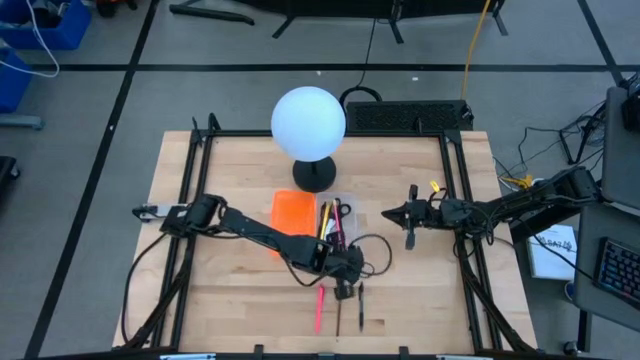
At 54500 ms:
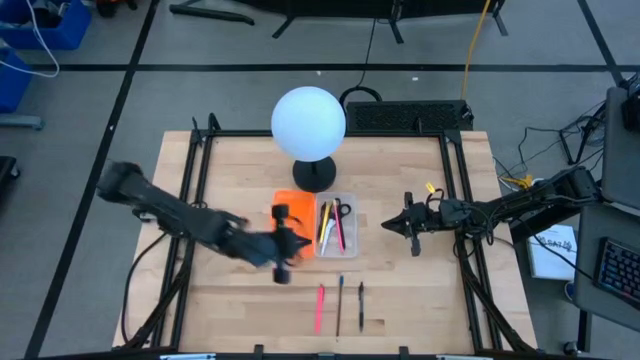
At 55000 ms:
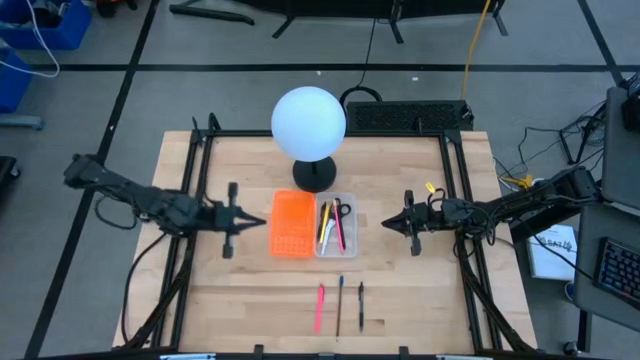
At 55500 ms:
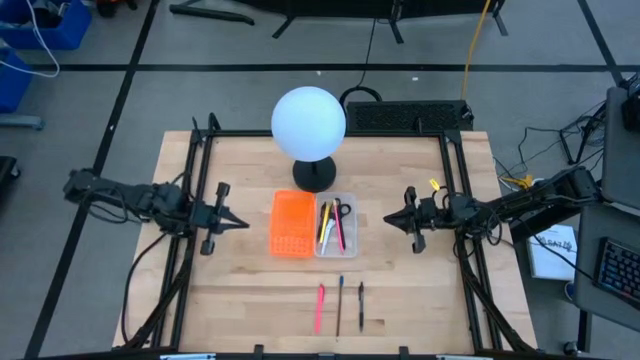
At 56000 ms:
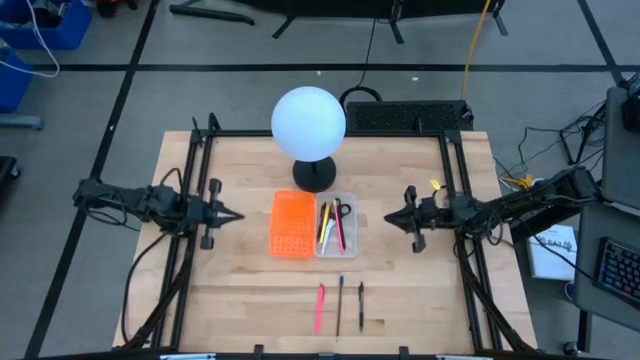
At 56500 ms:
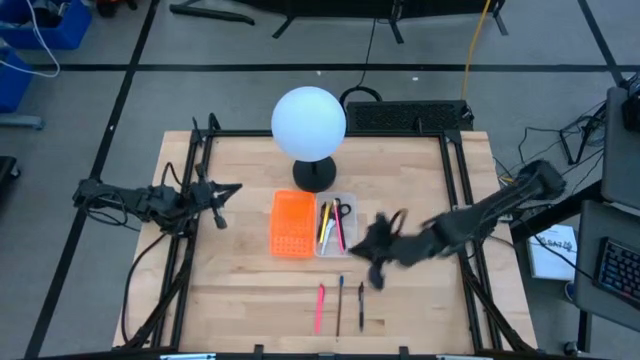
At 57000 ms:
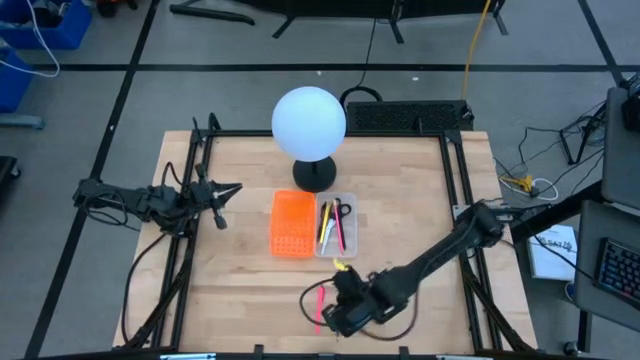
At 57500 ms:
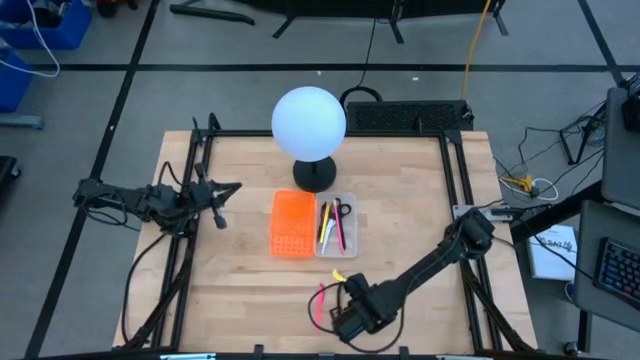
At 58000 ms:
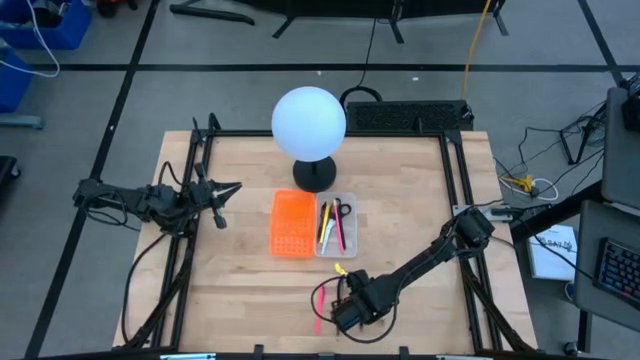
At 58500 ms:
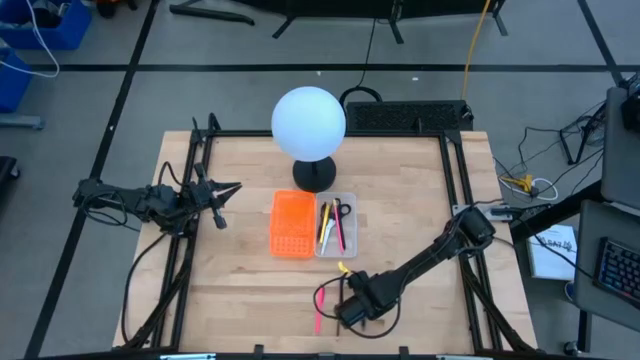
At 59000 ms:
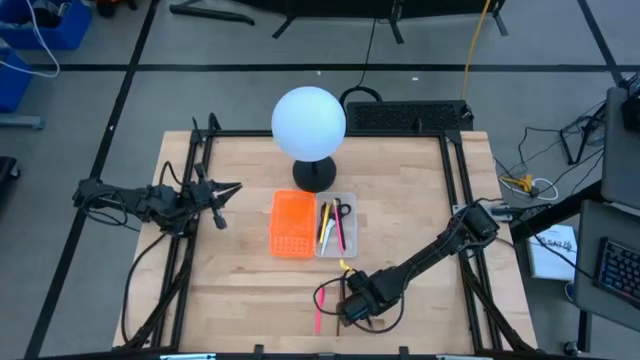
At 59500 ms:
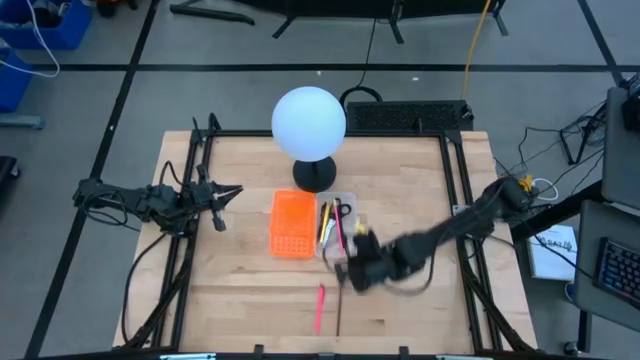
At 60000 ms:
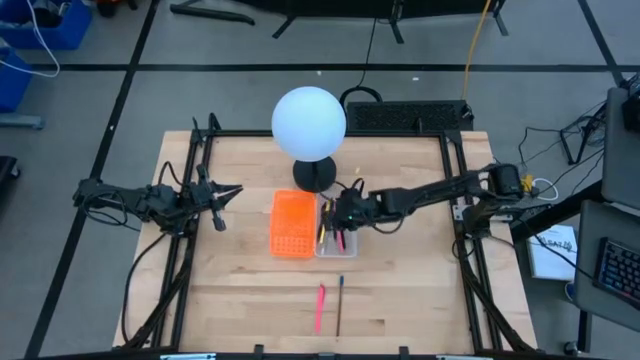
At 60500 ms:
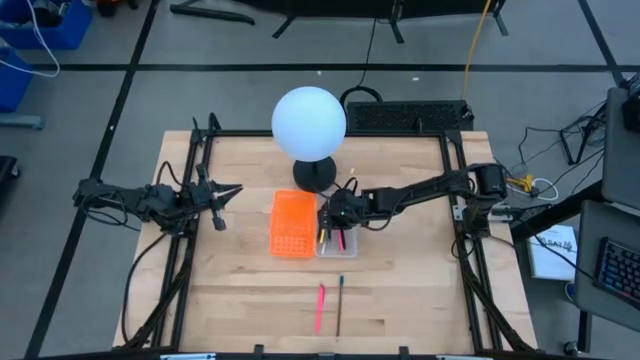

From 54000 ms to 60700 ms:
Task: Pick & place school supplies into a supply box
Put the black pen into the pencil box

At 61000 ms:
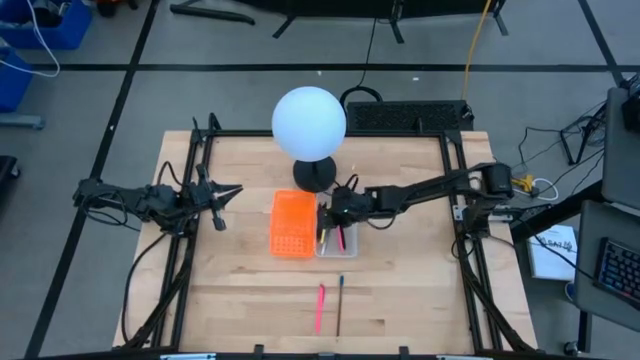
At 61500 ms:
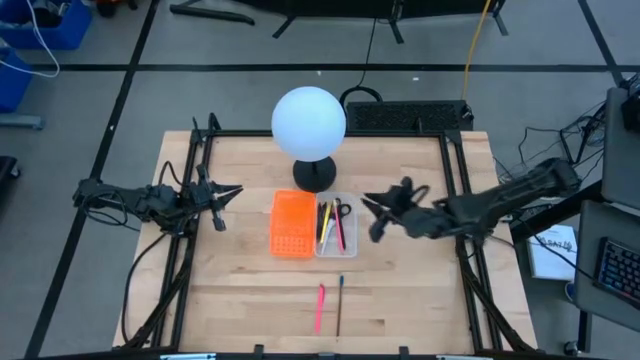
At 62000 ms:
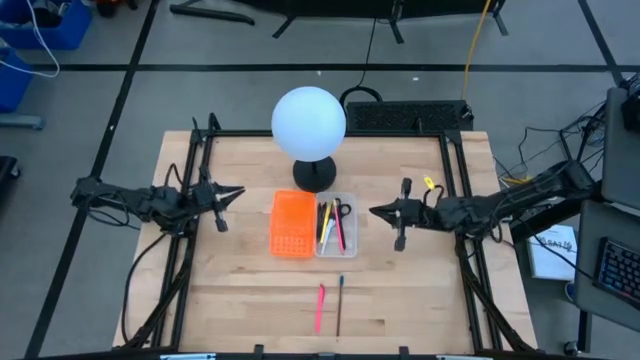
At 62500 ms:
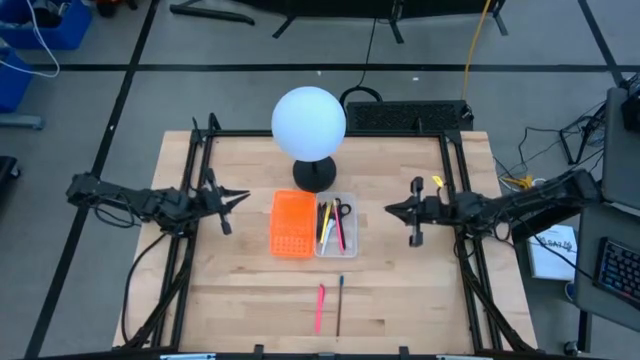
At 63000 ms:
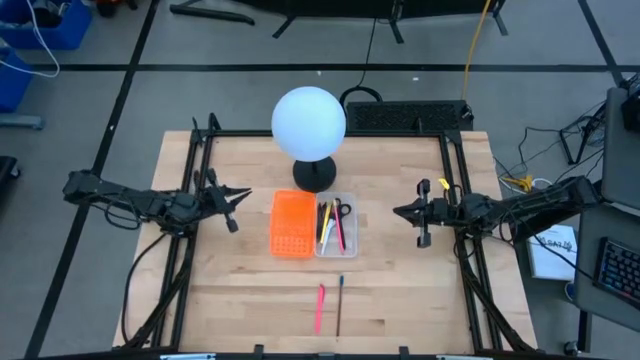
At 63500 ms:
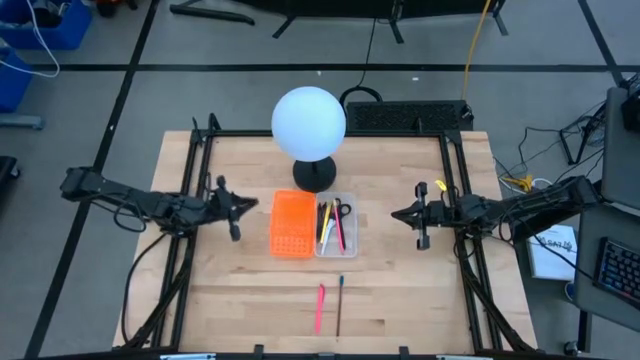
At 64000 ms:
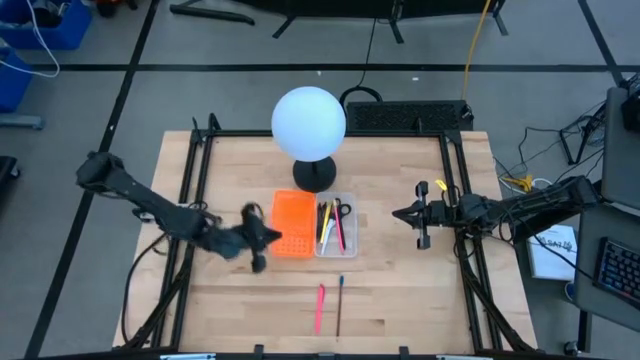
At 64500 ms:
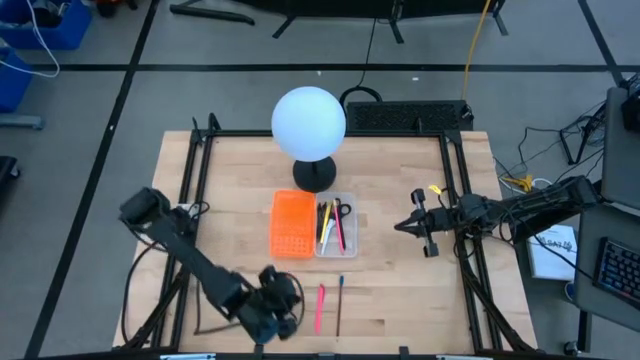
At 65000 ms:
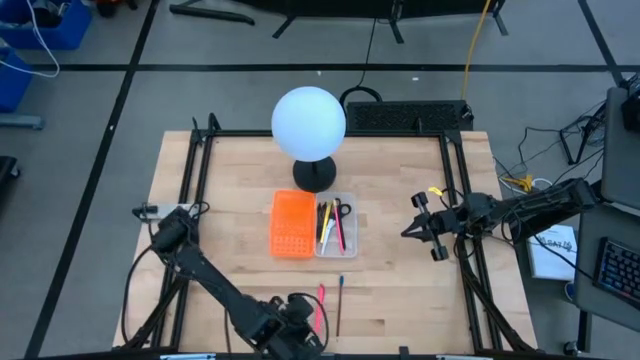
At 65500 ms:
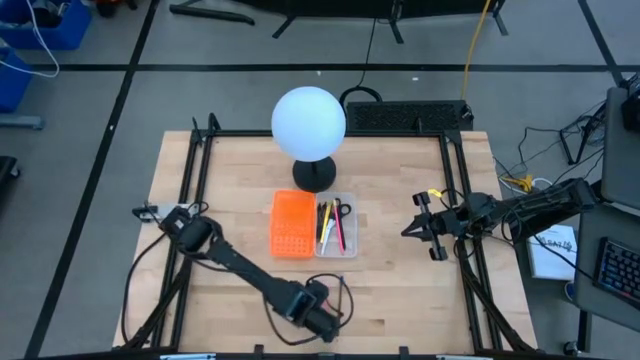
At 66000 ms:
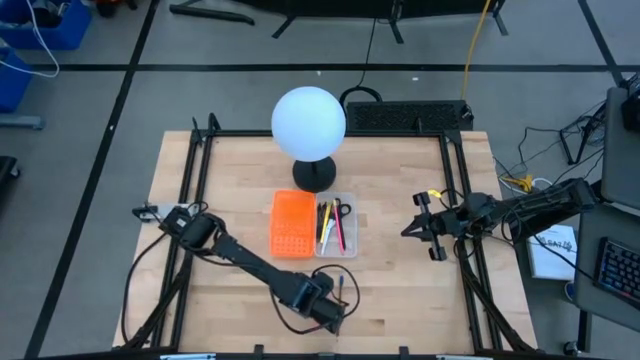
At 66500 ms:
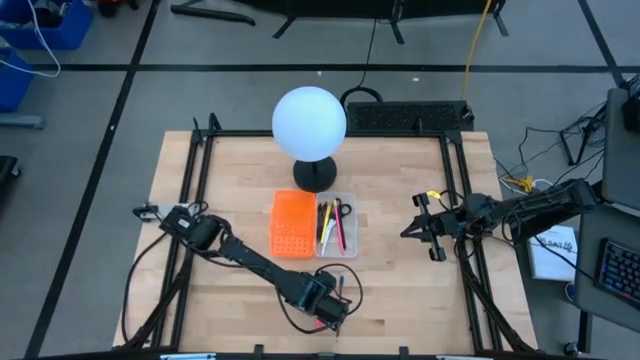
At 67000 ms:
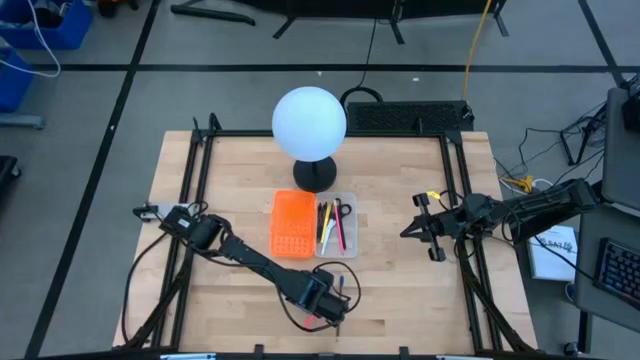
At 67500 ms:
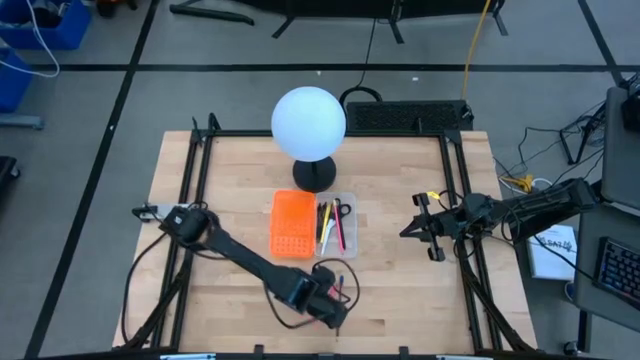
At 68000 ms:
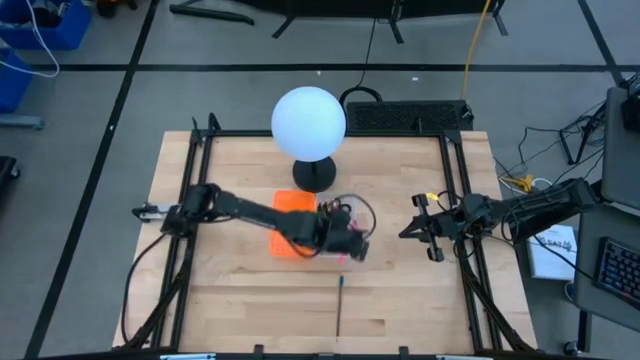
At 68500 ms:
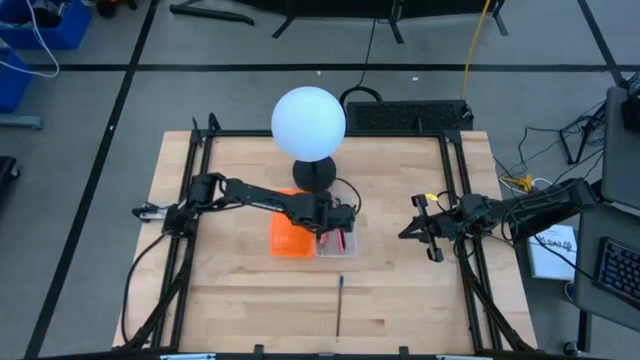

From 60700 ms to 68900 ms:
Put the pink pen into the pencil box

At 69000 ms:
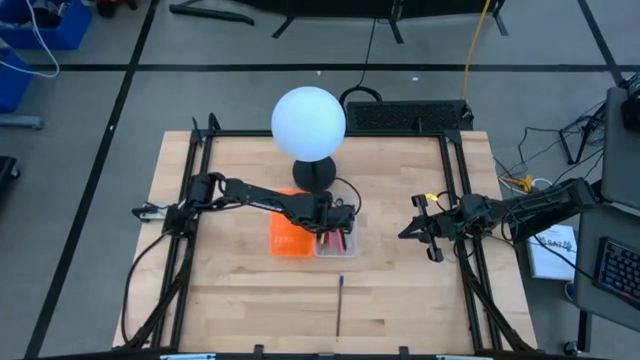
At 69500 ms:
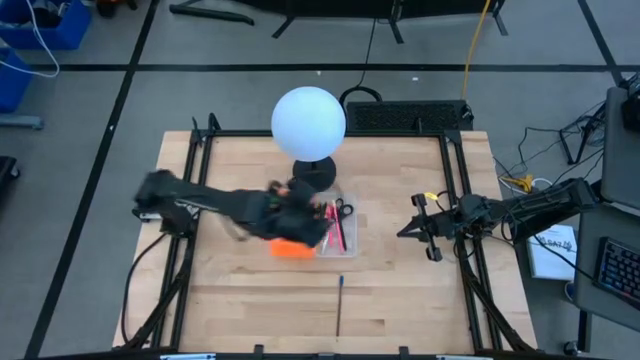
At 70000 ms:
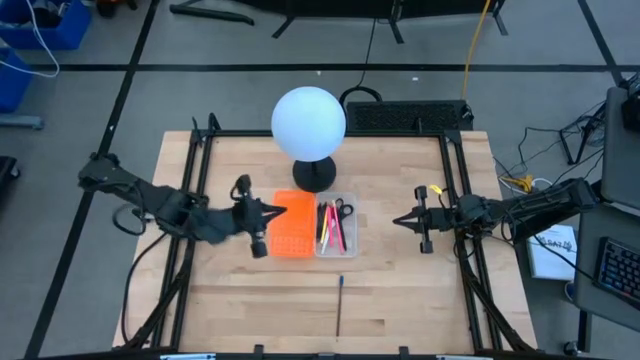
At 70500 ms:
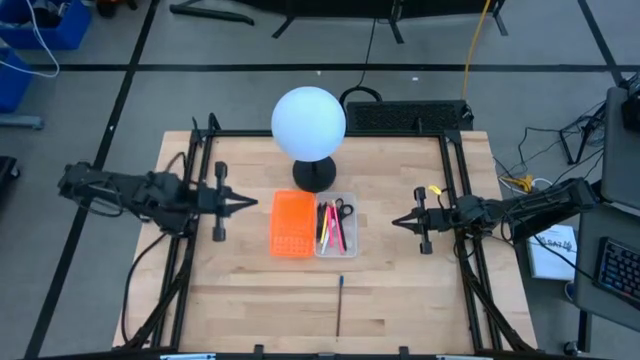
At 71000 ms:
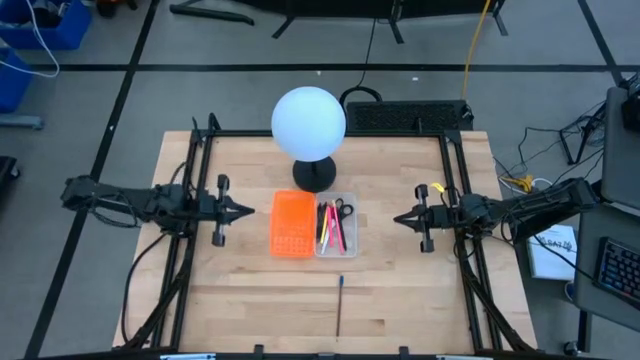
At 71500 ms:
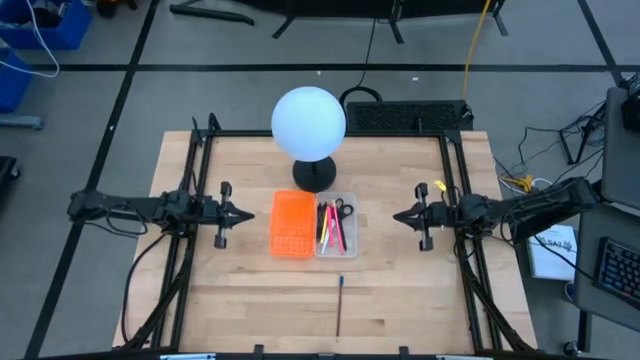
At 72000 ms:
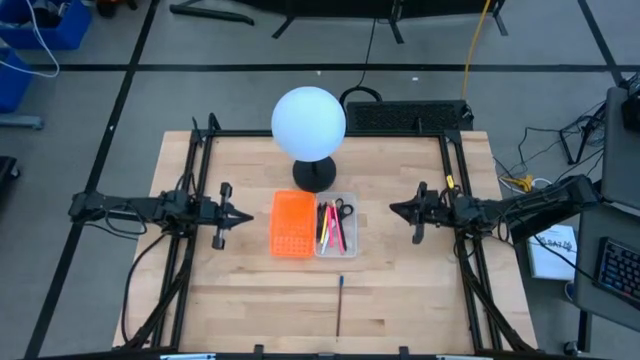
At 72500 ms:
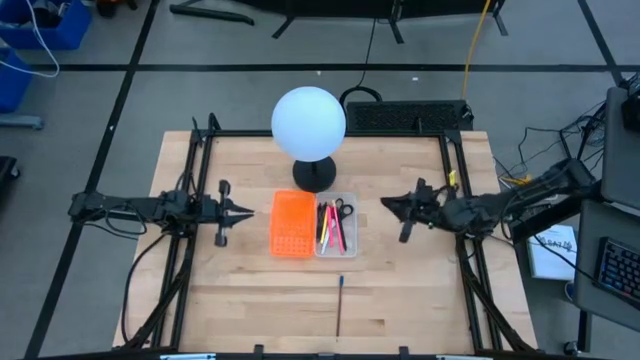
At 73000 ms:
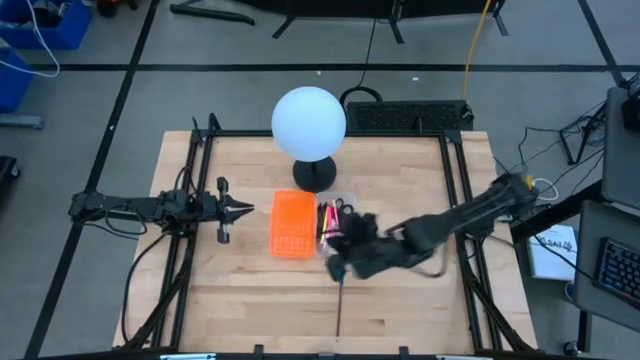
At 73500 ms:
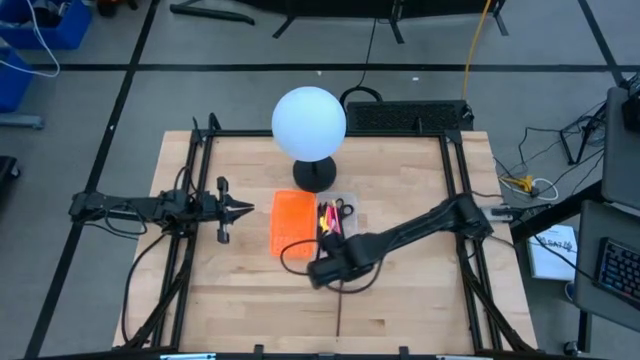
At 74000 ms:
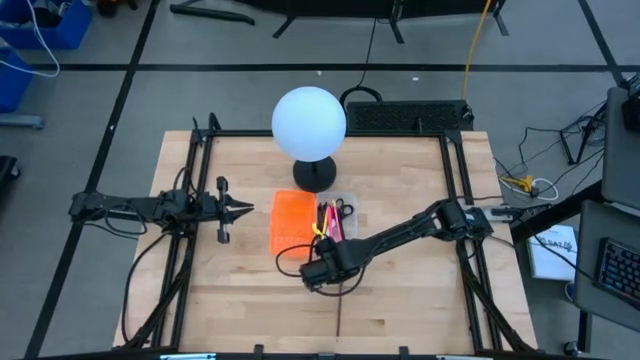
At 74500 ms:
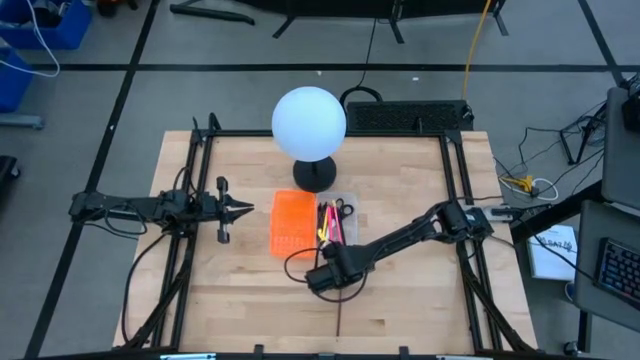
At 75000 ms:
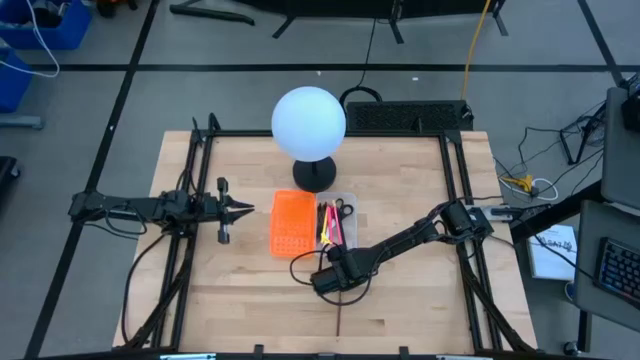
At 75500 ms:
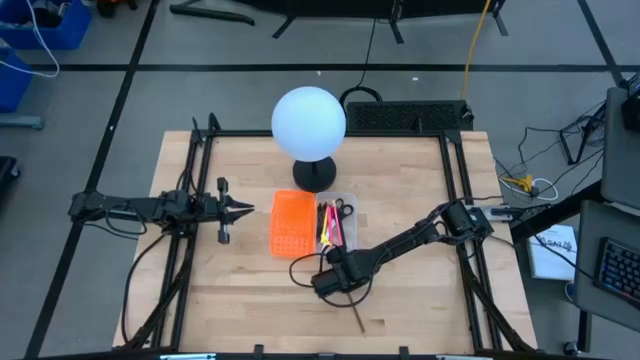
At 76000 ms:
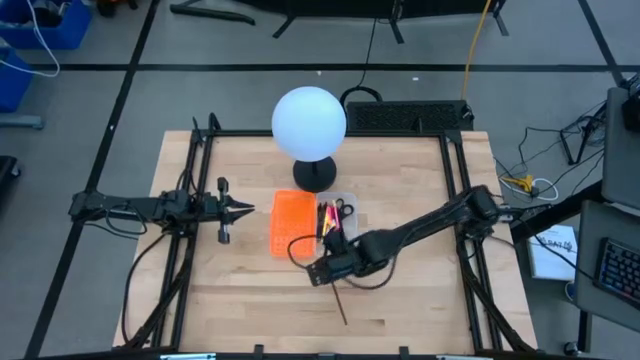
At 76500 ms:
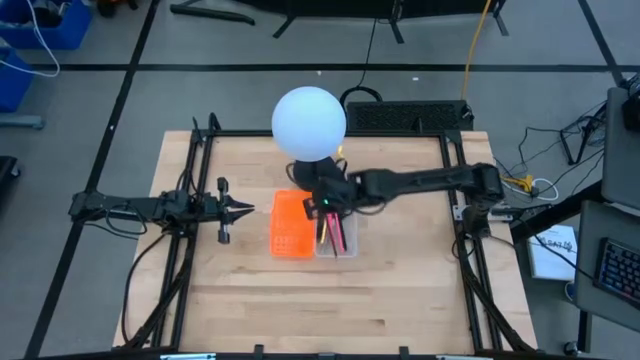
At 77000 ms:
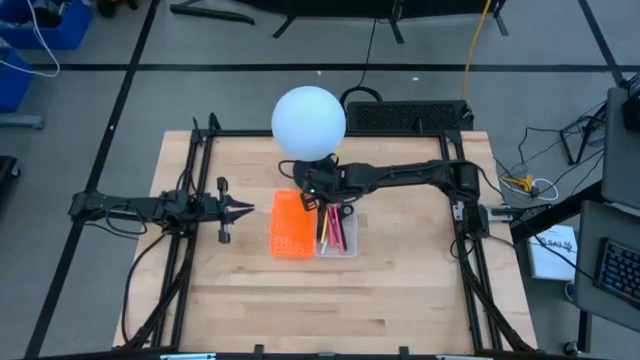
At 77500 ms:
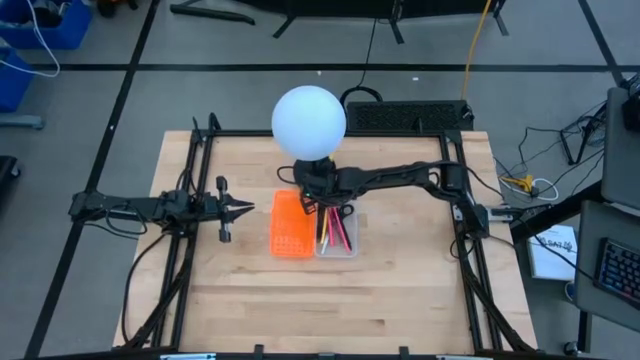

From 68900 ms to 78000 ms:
Put the brown pencil into the pencil box
